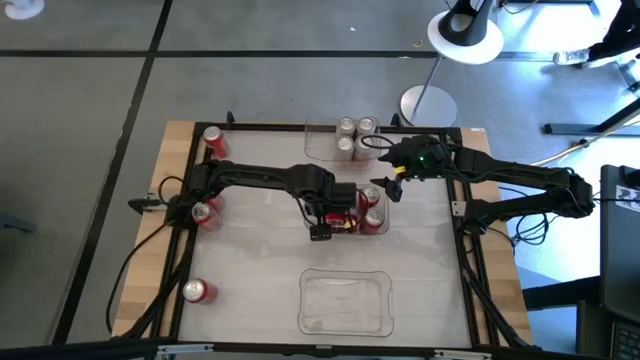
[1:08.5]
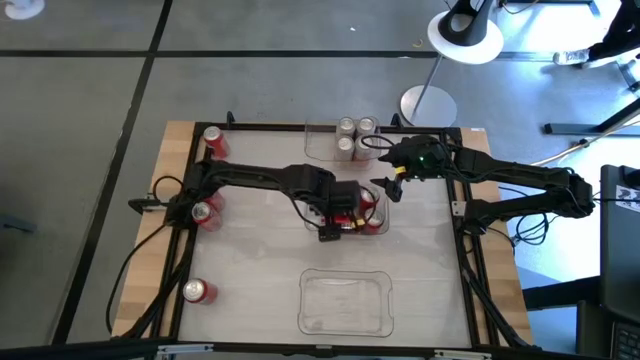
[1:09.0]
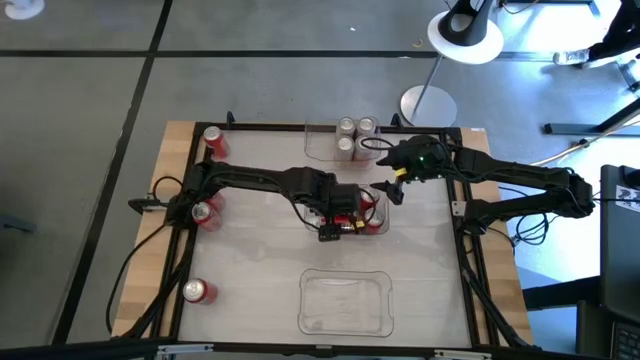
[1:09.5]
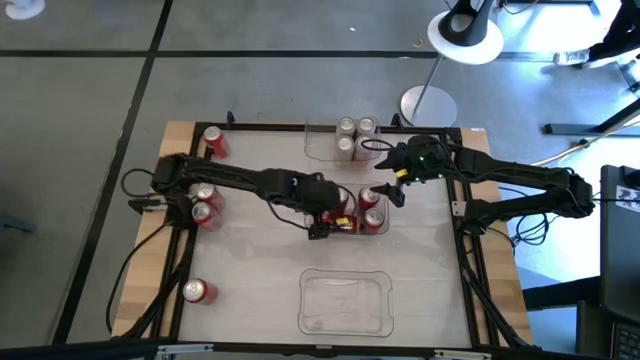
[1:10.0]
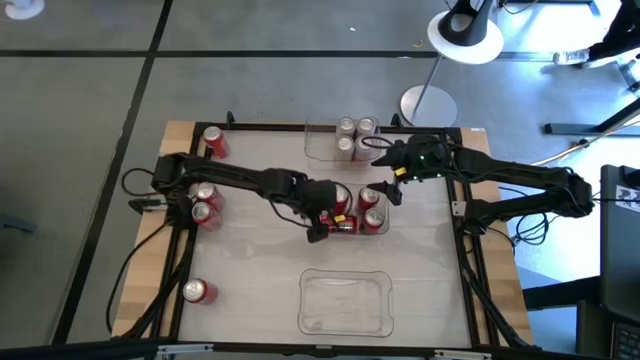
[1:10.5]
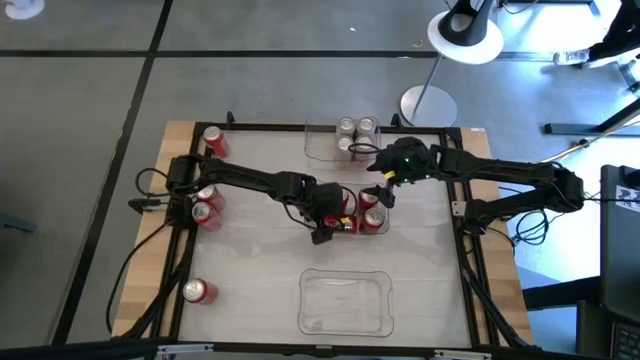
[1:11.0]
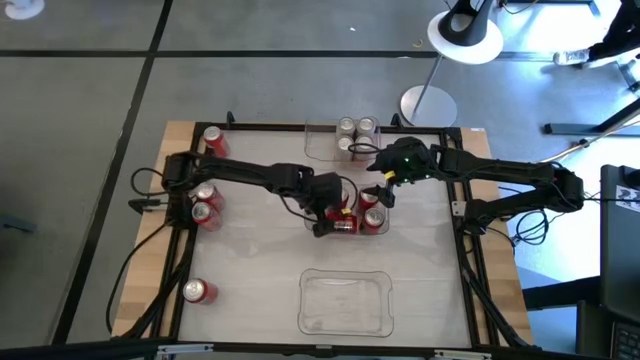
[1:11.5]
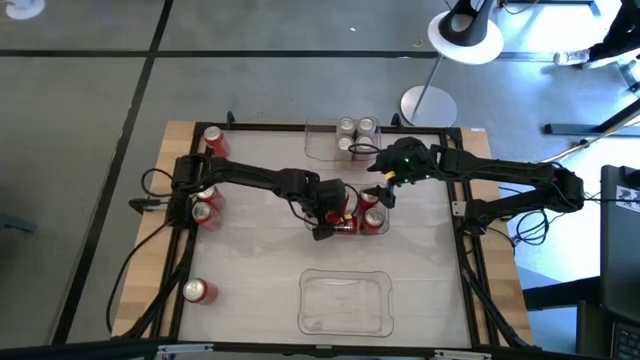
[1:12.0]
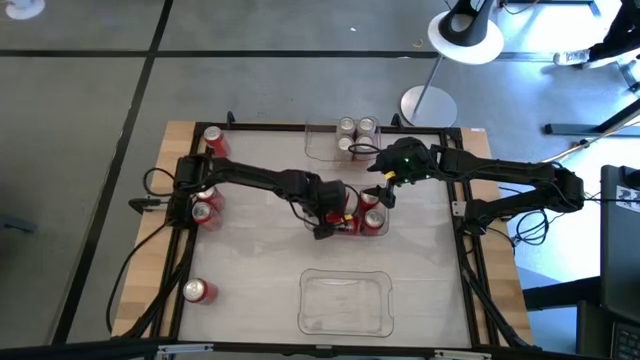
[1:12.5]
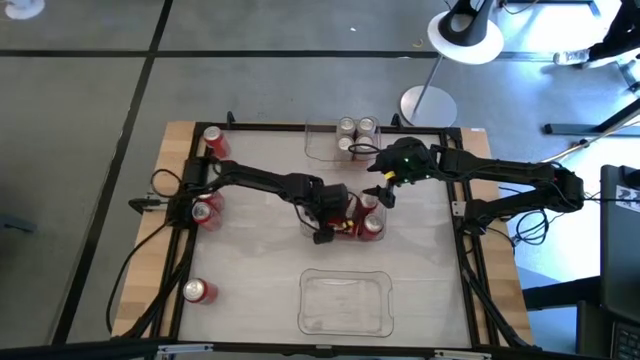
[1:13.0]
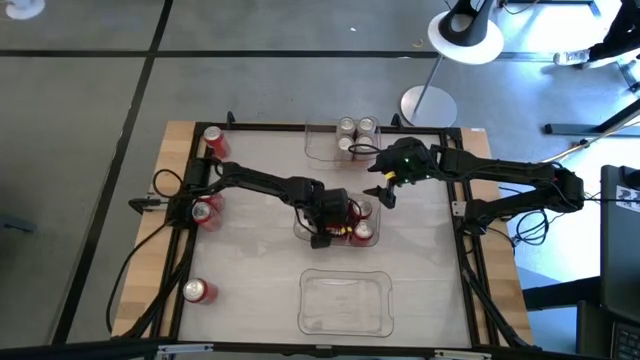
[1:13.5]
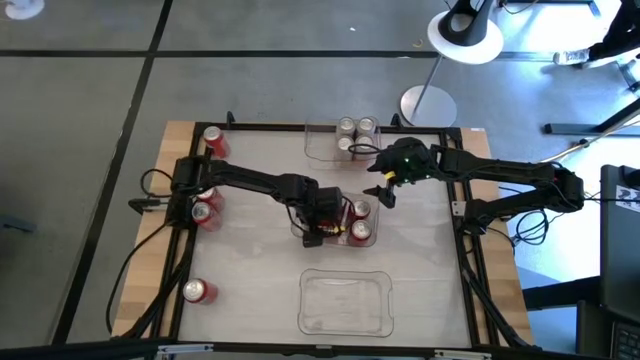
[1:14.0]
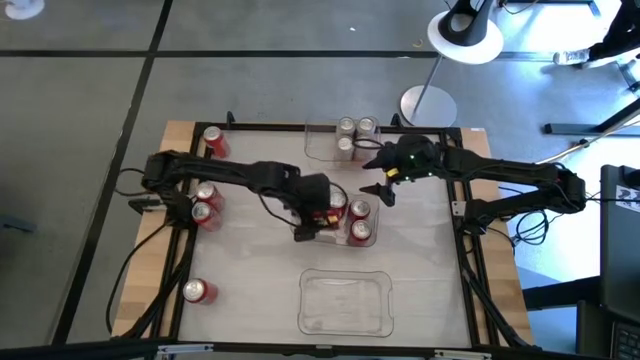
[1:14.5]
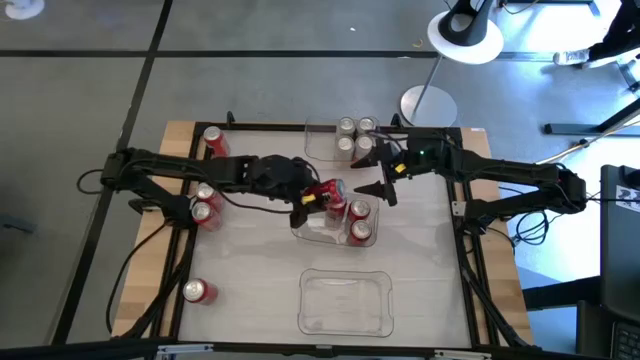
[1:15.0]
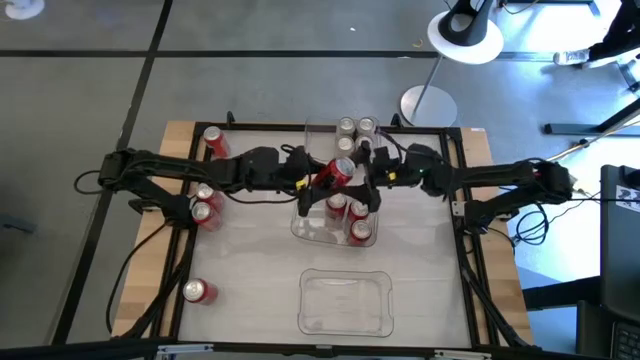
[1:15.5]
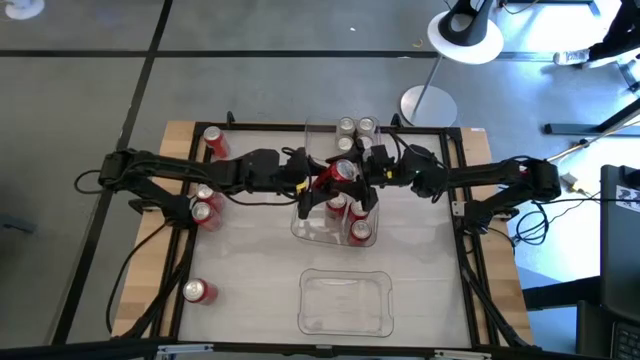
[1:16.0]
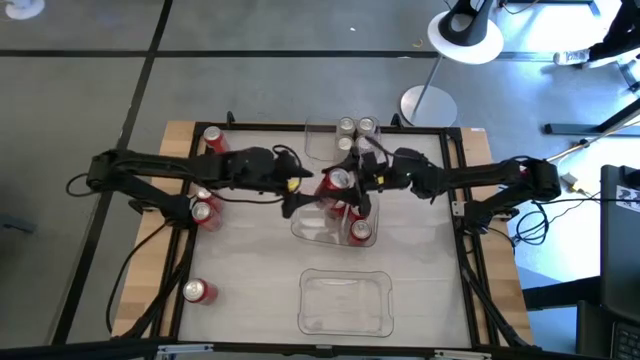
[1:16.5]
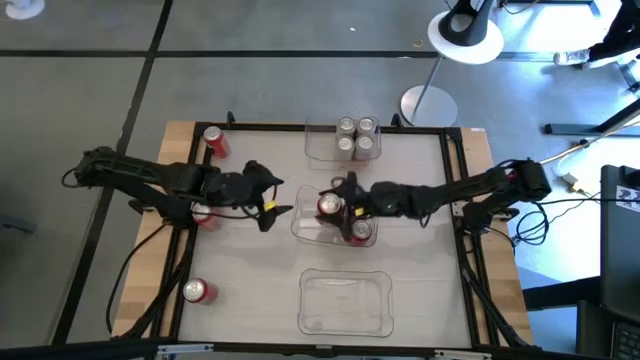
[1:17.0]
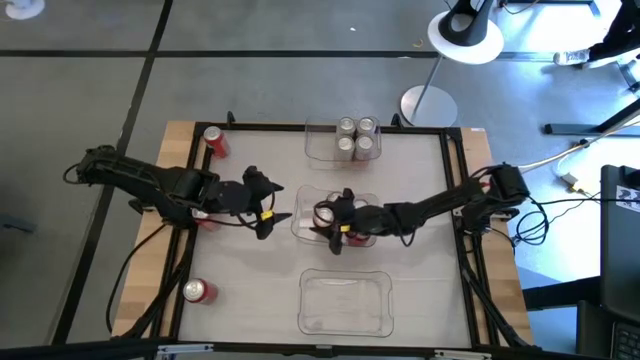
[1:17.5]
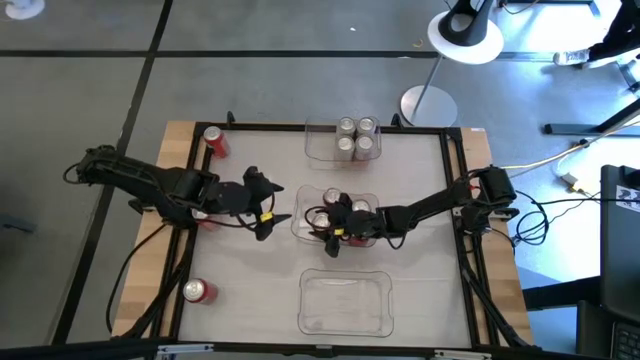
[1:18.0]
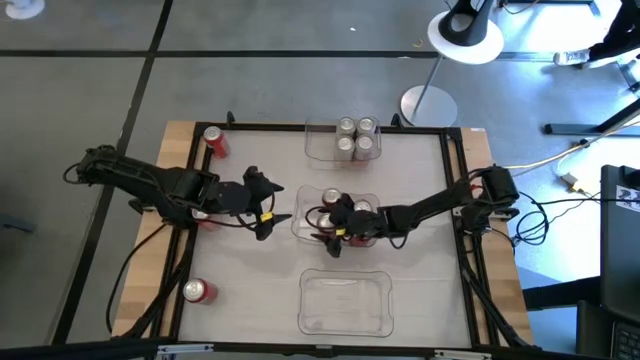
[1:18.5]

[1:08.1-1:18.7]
Task: Sort soda cans
Put the red black soda can into the middle transparent bin

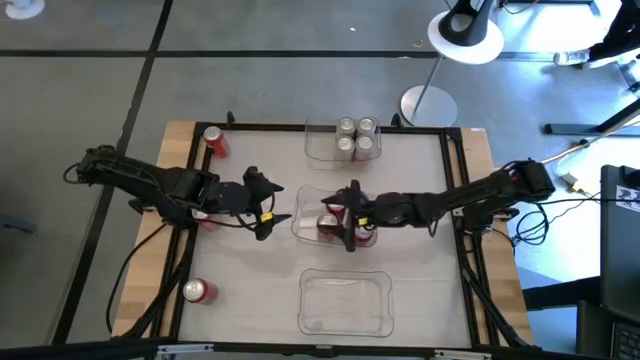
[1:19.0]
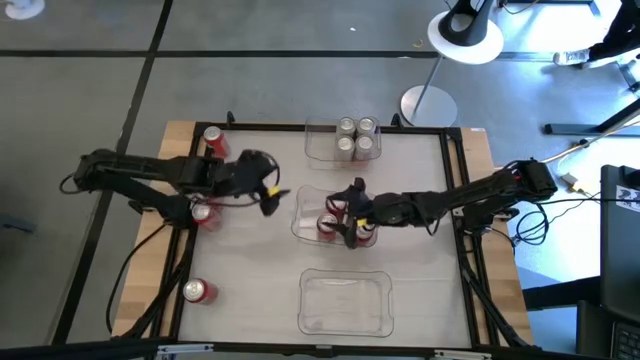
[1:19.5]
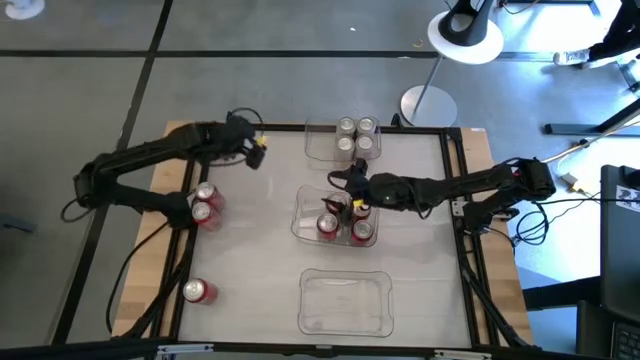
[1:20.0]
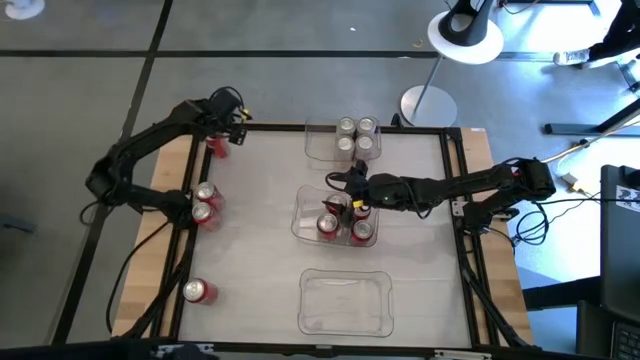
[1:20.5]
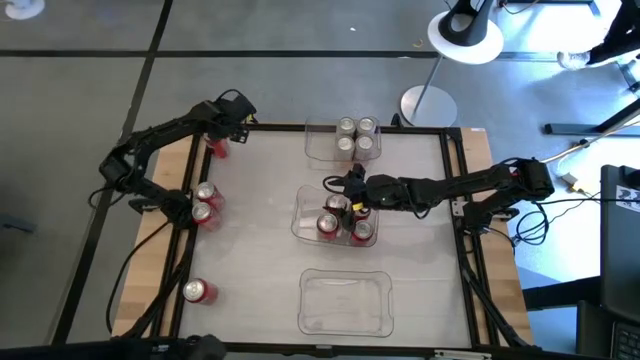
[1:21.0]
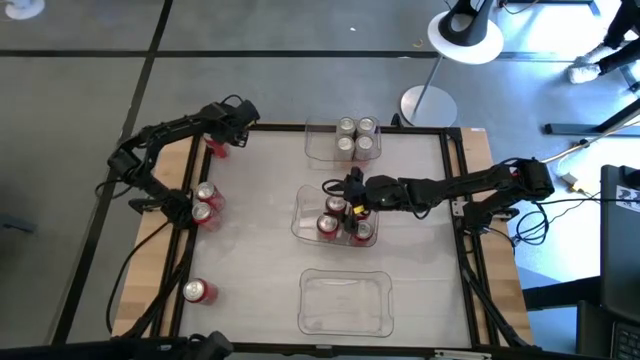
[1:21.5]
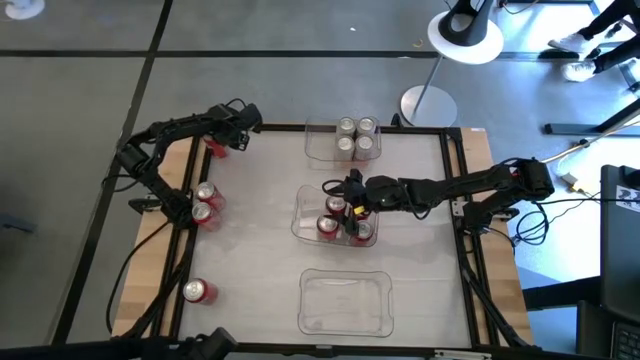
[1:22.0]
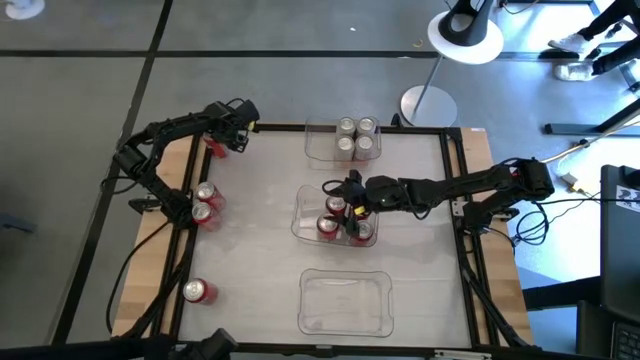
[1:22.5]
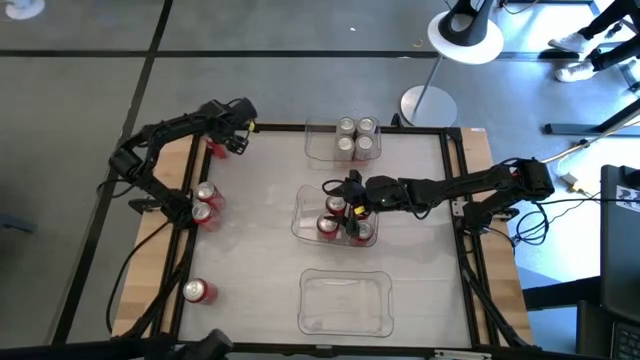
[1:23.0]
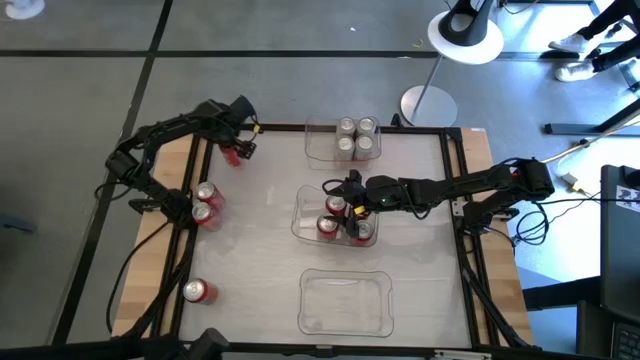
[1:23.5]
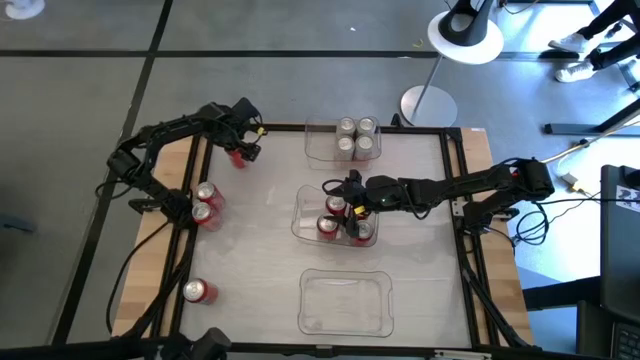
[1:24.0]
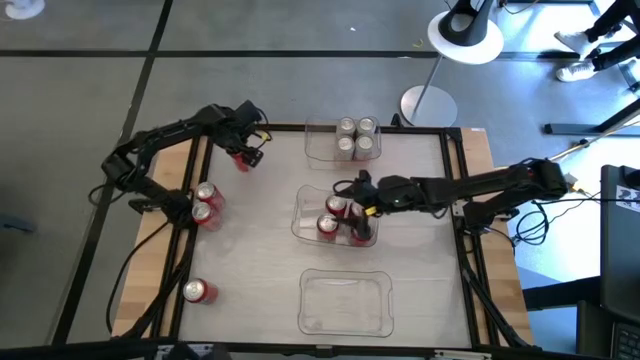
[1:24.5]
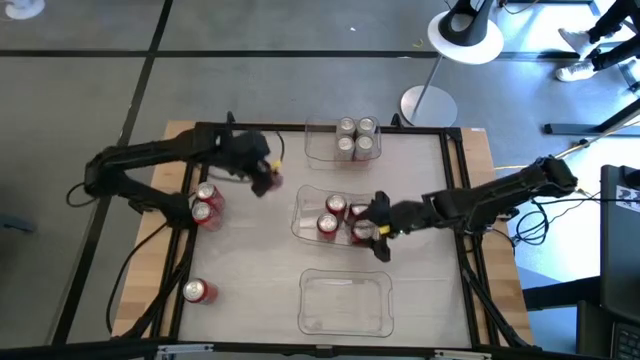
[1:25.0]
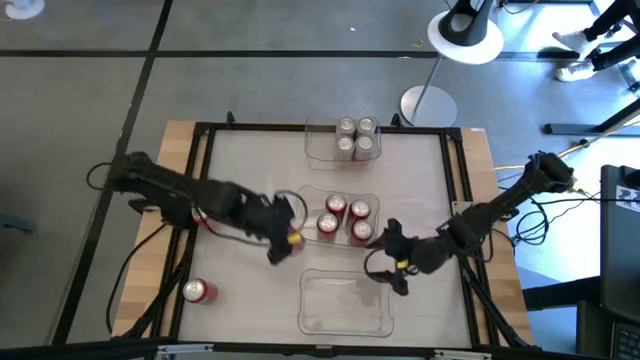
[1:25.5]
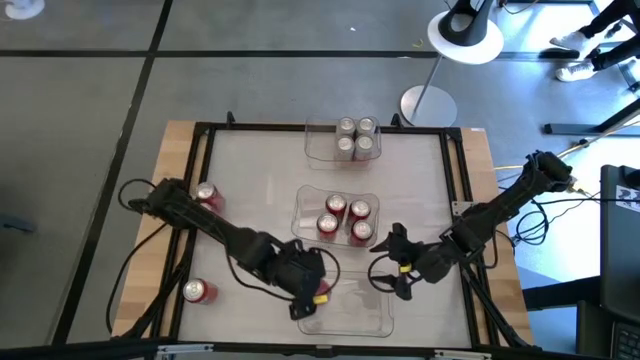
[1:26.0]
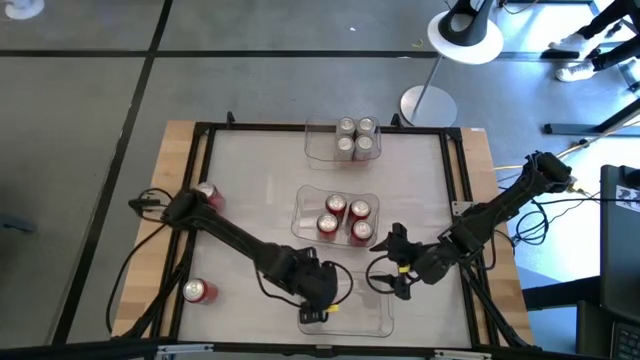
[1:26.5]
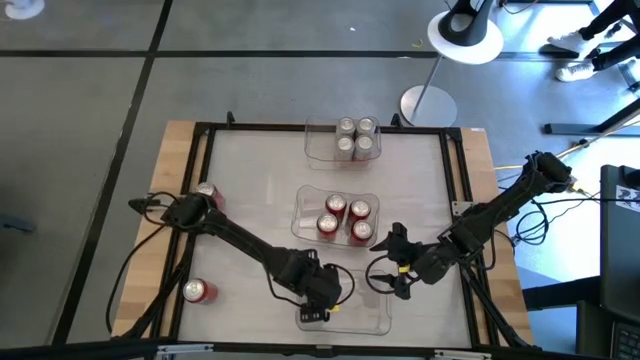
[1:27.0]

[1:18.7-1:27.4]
Put the top red soda can into the bottom transparent bin

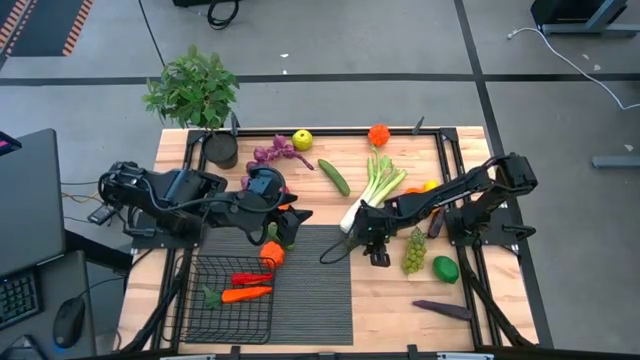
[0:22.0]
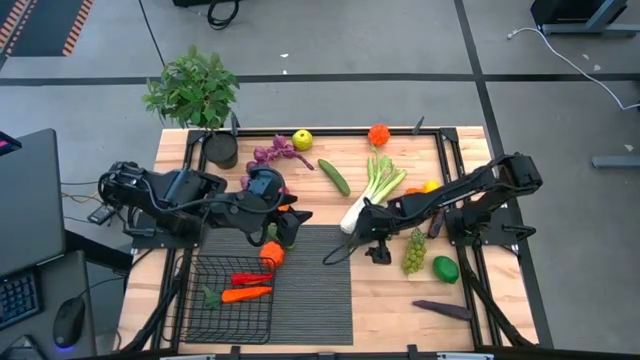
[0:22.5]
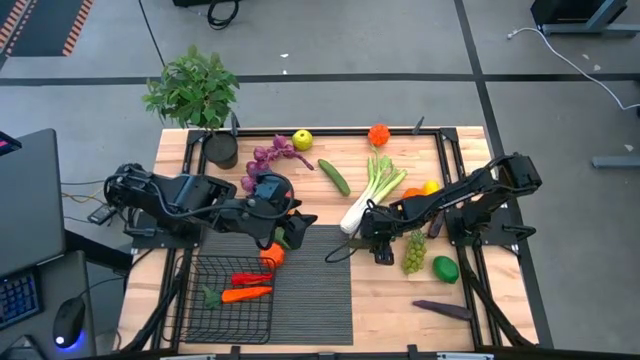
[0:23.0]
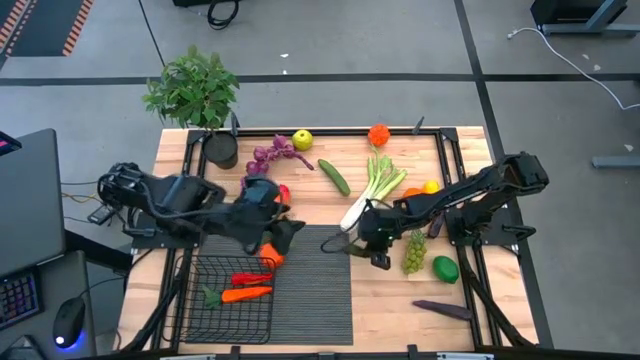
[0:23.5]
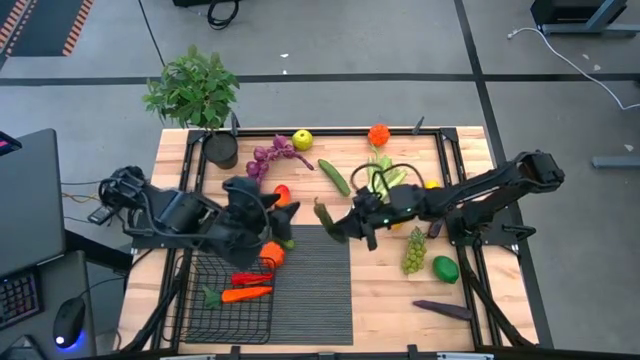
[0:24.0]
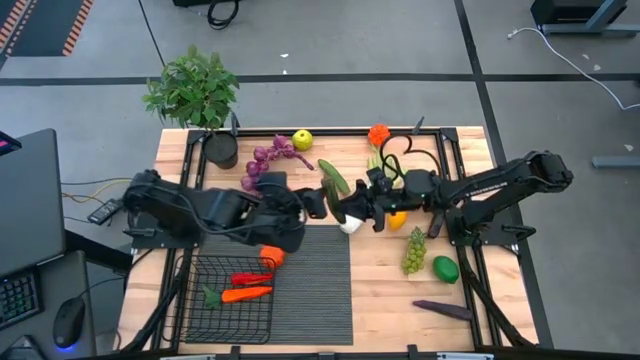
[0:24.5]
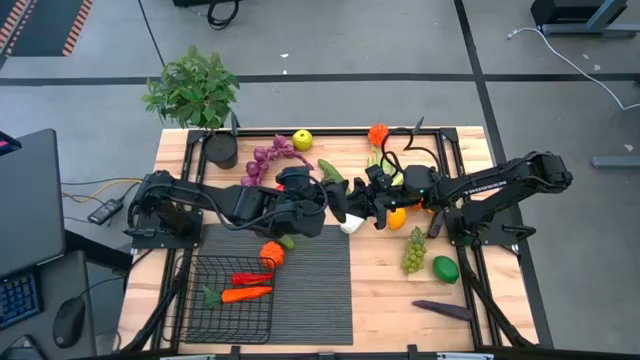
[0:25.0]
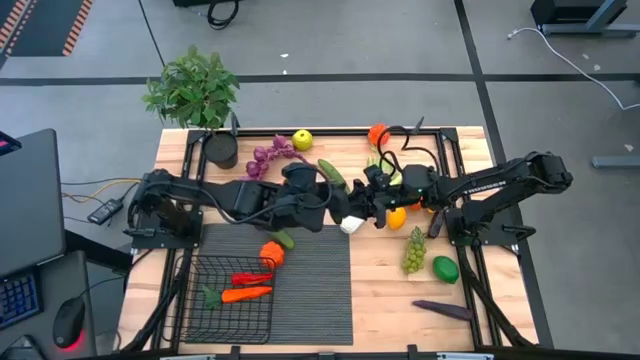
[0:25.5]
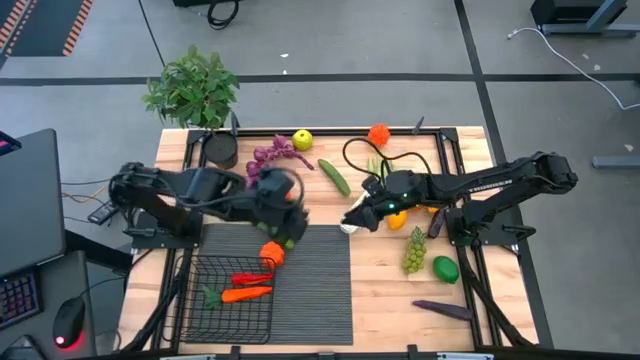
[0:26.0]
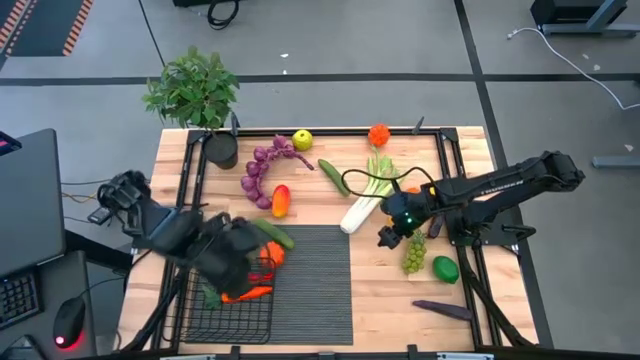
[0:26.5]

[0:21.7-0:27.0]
Task: Build produce basket
Put the green chili pepper into the wire basket
